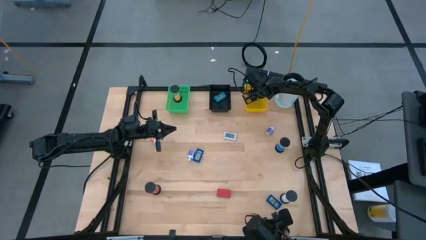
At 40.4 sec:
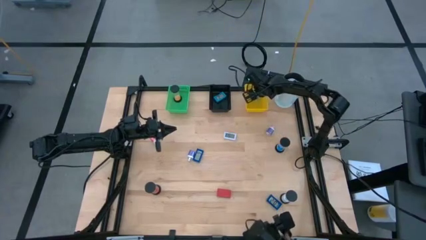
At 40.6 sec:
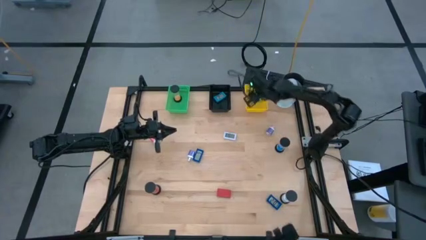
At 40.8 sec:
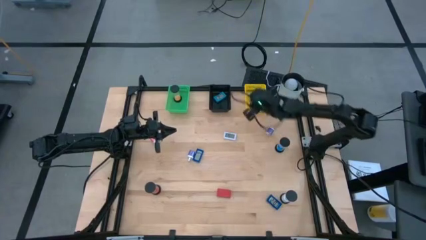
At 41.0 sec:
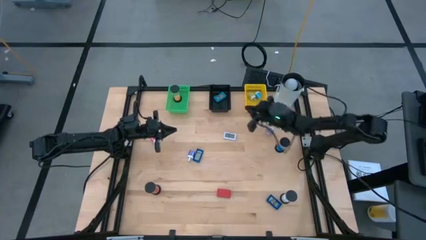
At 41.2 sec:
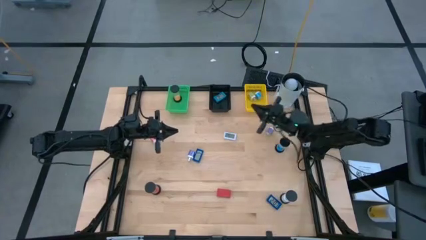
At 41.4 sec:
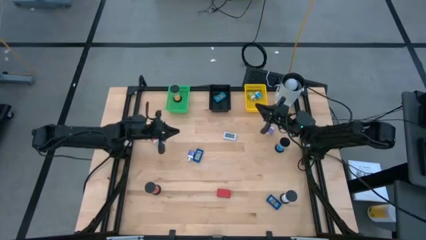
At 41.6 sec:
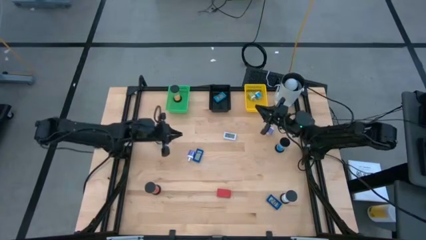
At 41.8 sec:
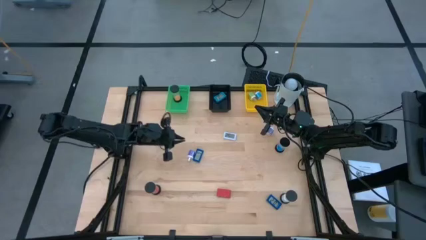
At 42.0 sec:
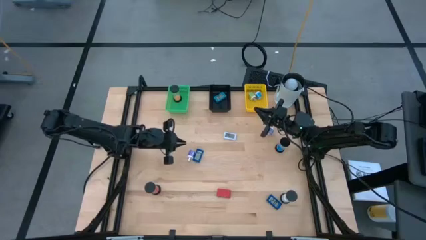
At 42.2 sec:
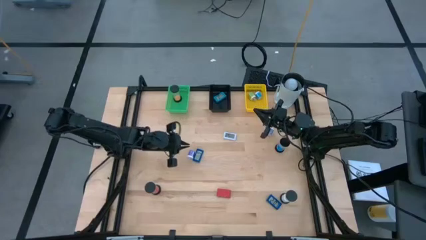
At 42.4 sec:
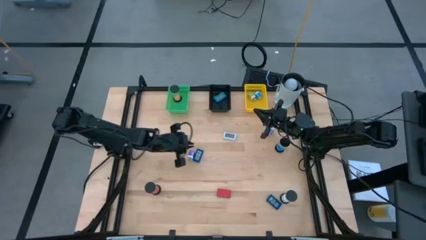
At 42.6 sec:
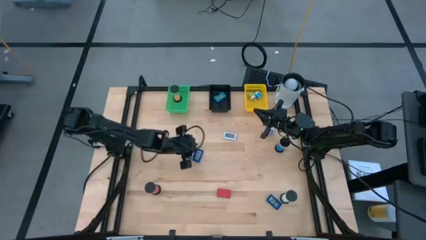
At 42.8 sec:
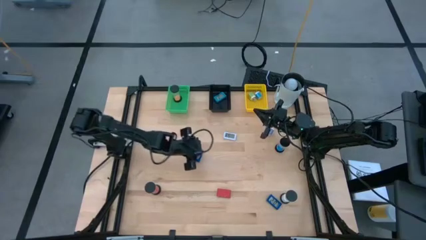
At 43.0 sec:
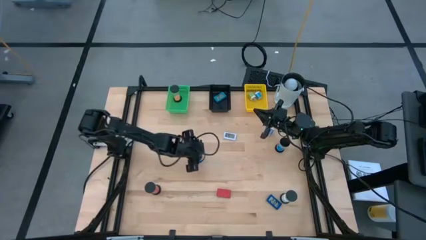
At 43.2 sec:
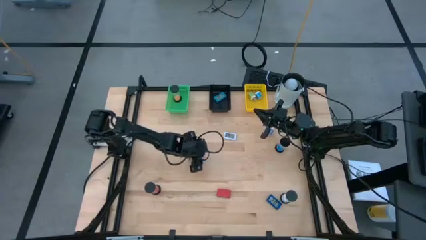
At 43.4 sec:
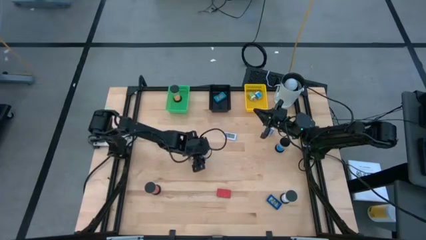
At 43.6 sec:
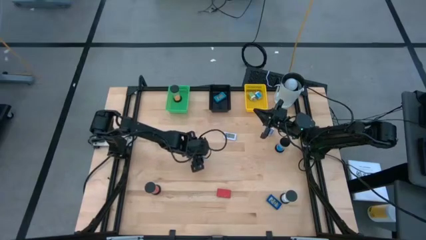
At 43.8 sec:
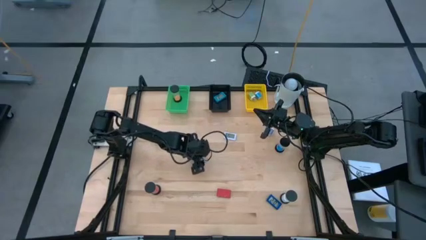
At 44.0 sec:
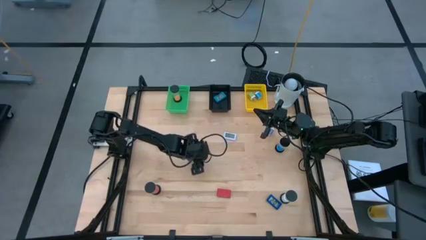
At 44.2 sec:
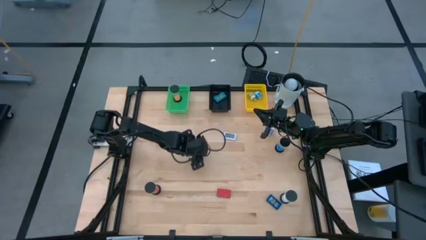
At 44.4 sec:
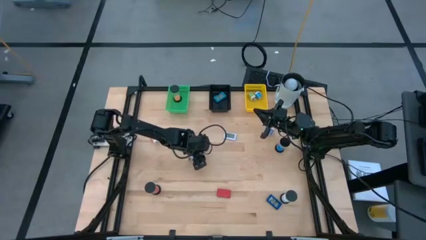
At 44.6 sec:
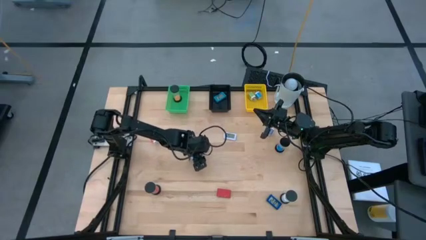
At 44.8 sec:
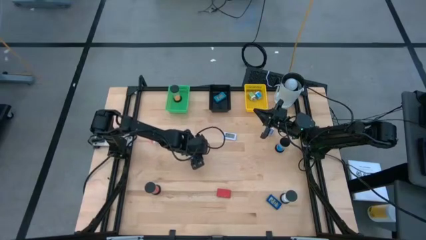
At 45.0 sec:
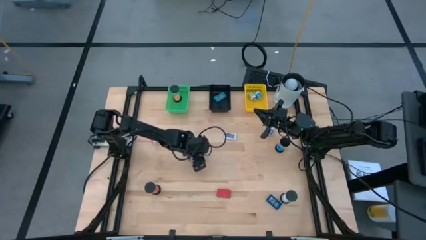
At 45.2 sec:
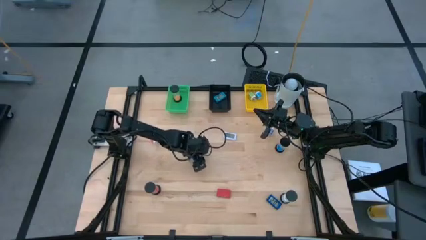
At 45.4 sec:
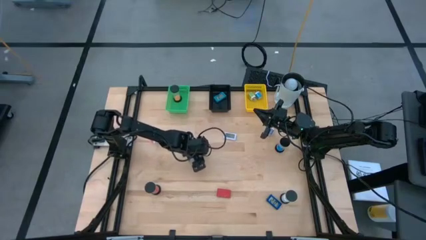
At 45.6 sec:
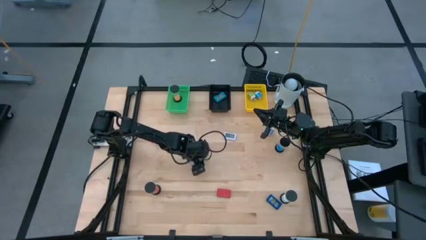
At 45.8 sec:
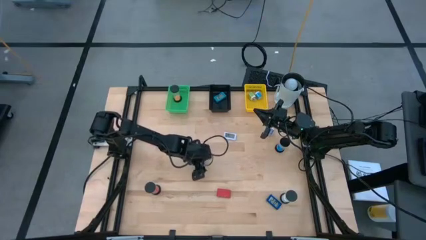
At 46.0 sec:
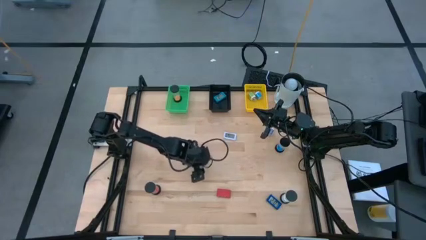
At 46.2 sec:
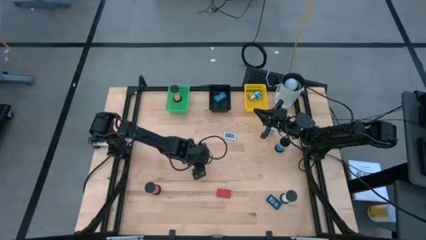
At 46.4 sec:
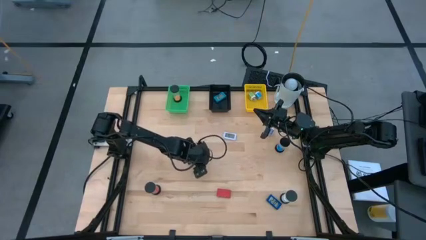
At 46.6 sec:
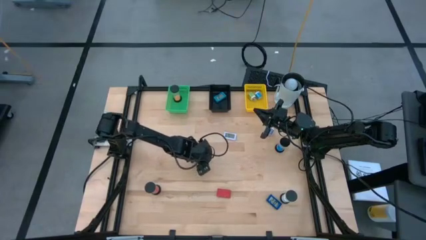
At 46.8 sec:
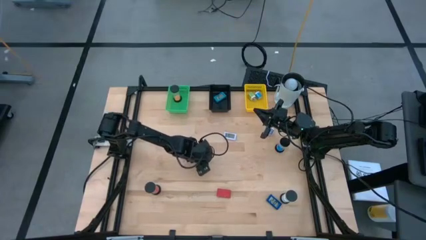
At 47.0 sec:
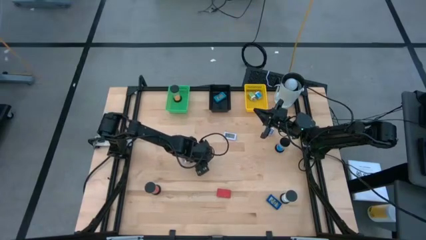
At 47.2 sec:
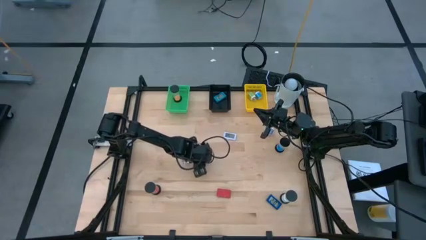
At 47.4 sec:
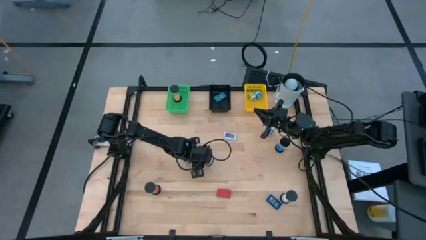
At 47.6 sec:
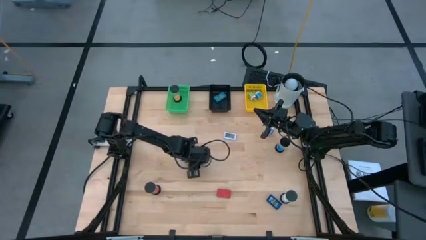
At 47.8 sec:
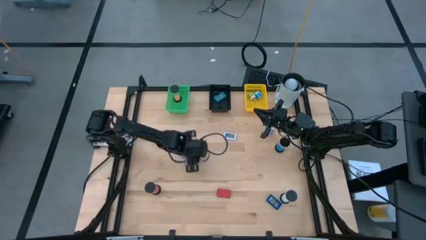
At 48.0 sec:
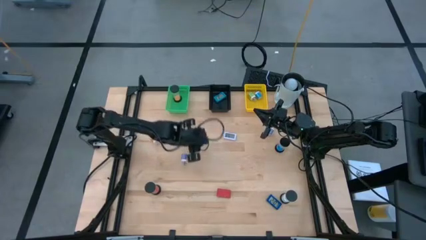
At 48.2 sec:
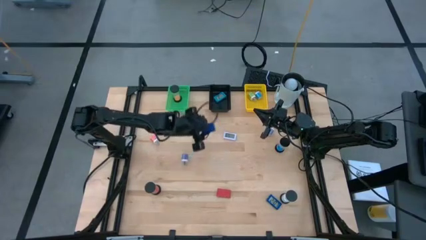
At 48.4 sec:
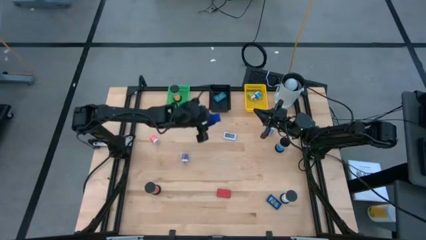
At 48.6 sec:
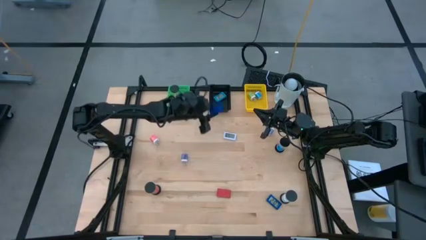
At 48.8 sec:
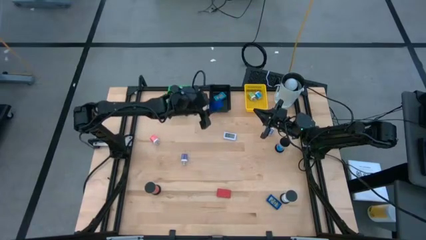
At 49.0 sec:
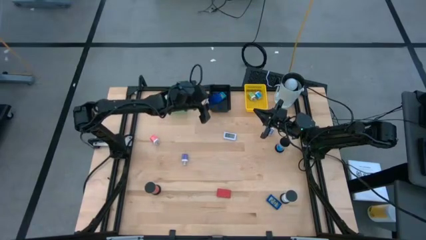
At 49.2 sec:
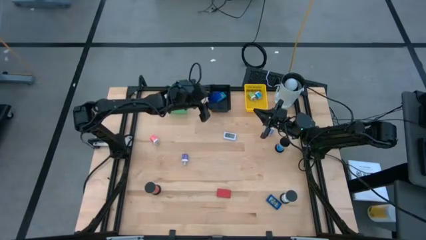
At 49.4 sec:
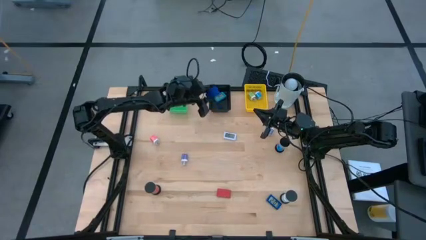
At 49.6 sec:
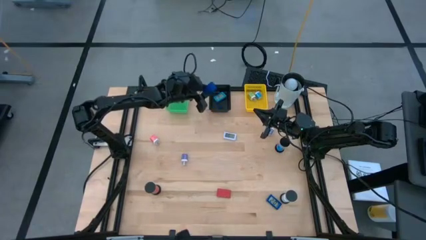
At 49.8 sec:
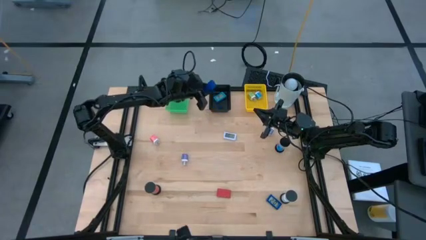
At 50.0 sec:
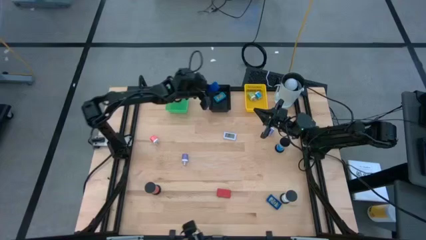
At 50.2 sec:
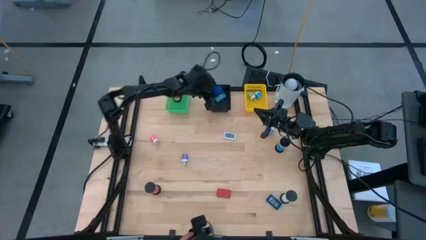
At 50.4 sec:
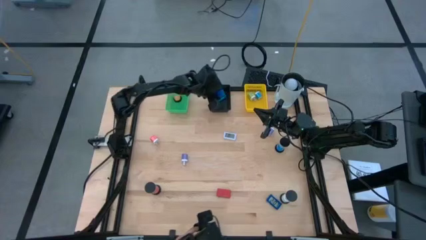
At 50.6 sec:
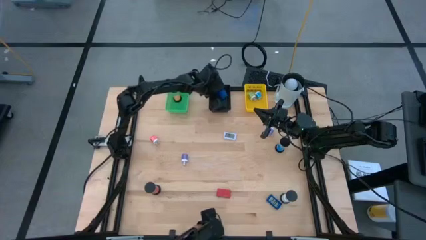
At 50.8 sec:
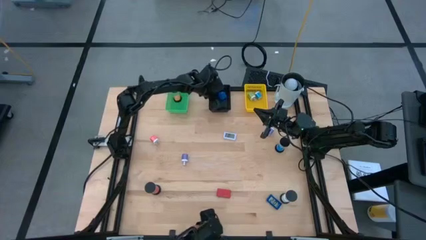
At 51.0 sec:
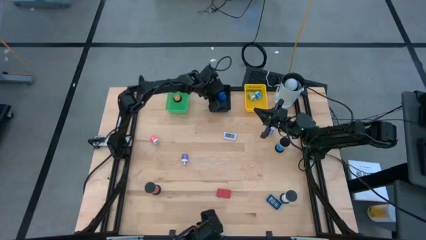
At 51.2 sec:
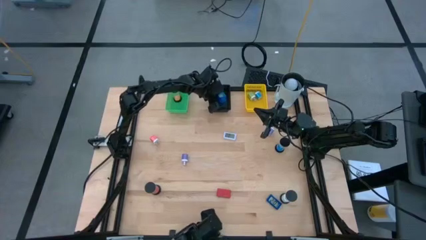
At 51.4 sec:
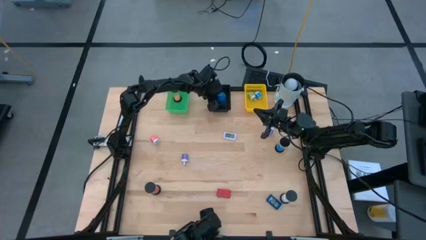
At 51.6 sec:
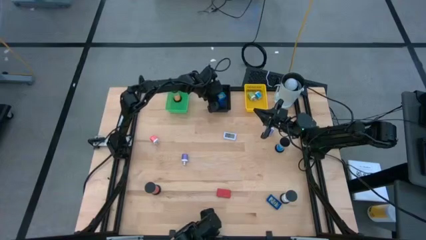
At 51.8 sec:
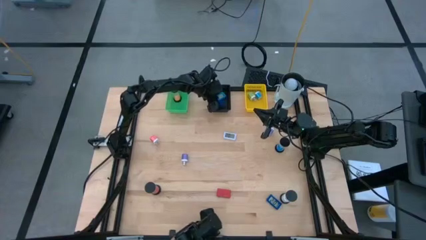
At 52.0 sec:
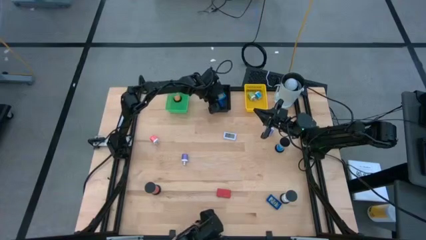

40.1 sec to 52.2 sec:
Task: Pick & Place Office items
Put the top dark blue digital timer into the black bin

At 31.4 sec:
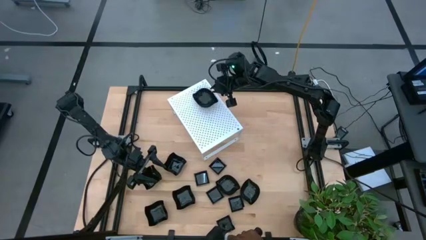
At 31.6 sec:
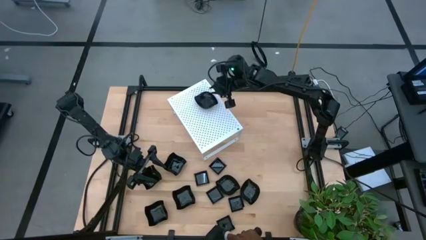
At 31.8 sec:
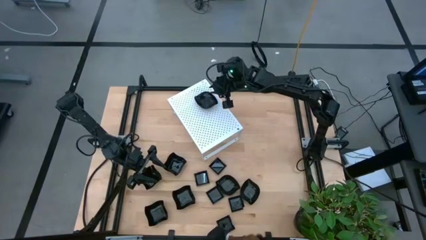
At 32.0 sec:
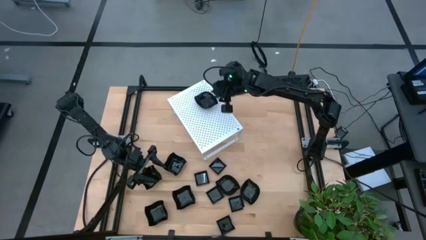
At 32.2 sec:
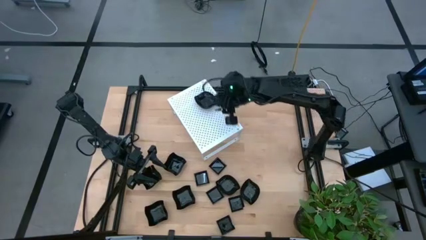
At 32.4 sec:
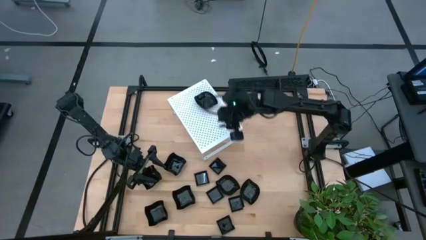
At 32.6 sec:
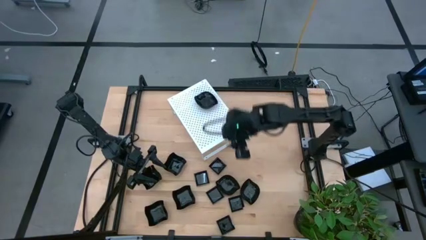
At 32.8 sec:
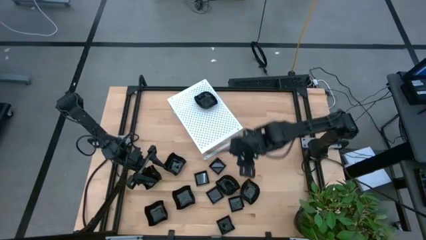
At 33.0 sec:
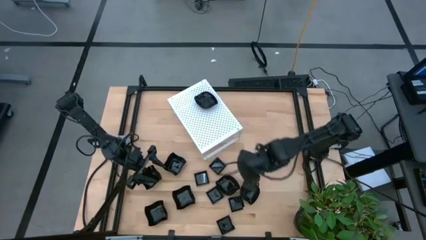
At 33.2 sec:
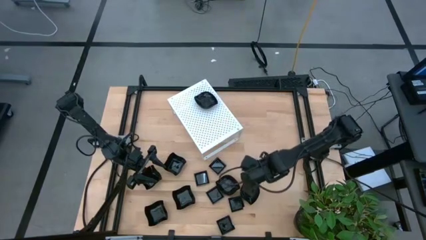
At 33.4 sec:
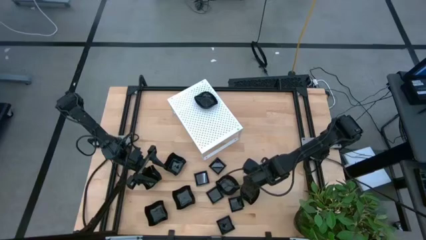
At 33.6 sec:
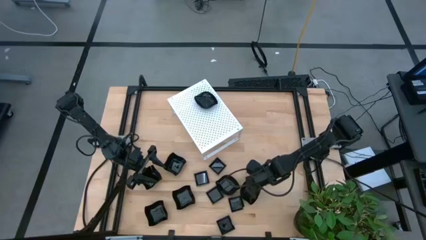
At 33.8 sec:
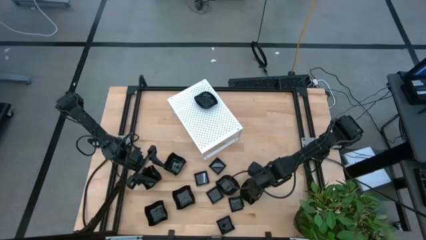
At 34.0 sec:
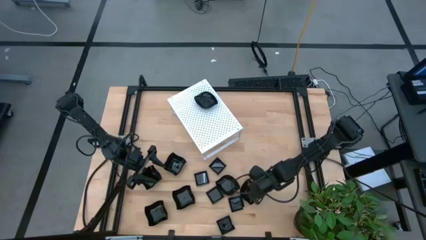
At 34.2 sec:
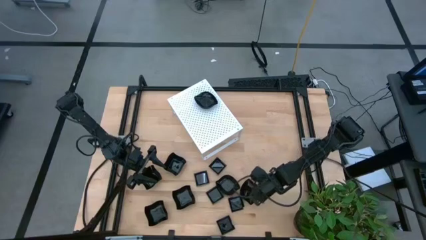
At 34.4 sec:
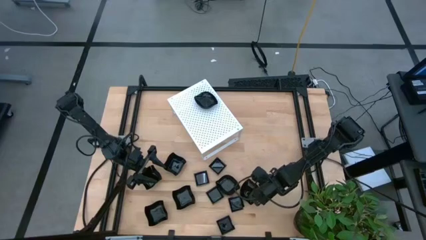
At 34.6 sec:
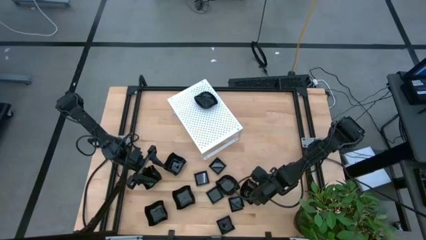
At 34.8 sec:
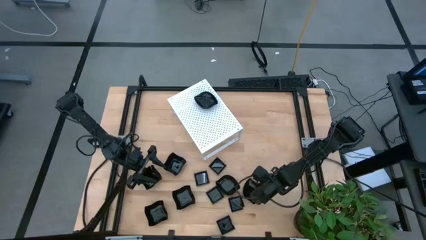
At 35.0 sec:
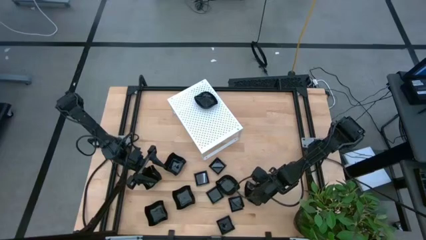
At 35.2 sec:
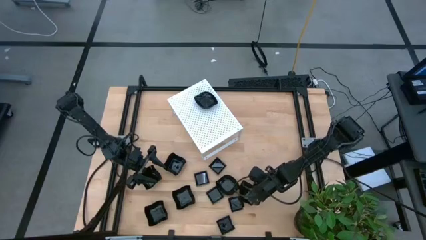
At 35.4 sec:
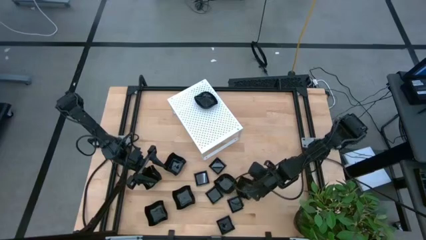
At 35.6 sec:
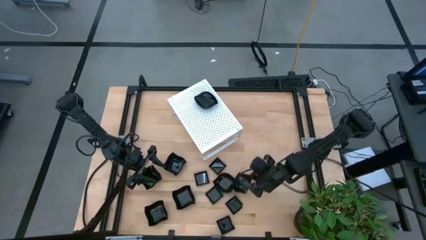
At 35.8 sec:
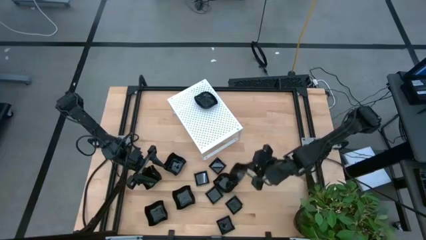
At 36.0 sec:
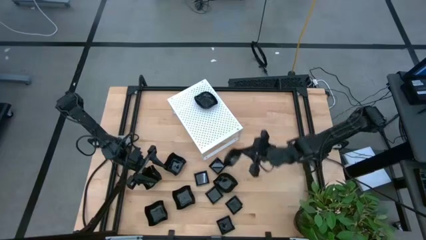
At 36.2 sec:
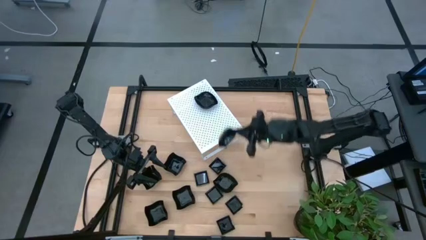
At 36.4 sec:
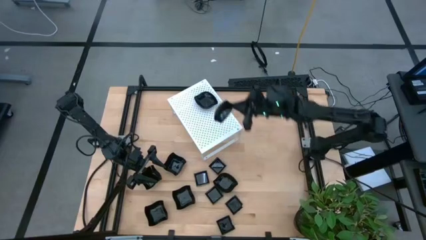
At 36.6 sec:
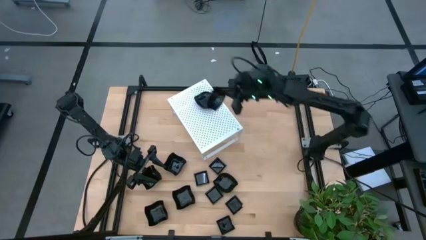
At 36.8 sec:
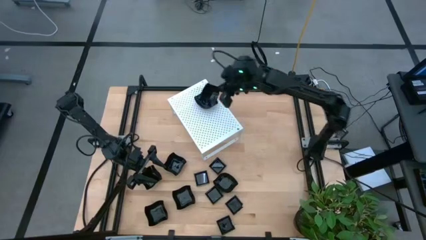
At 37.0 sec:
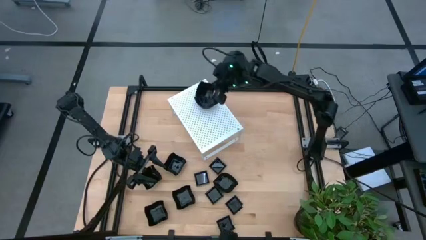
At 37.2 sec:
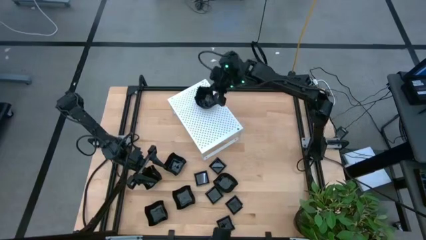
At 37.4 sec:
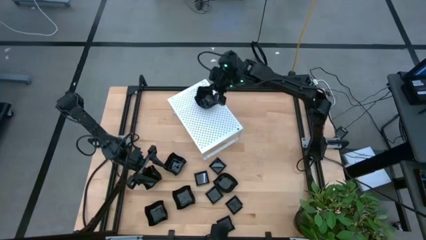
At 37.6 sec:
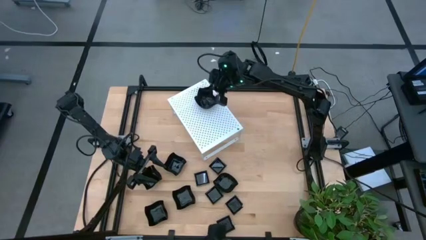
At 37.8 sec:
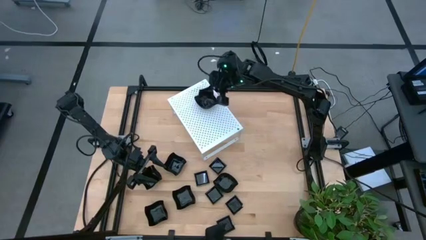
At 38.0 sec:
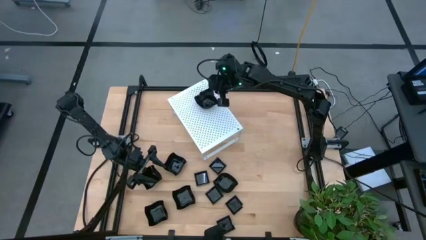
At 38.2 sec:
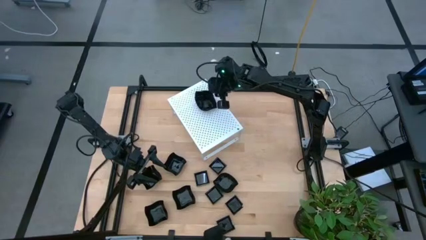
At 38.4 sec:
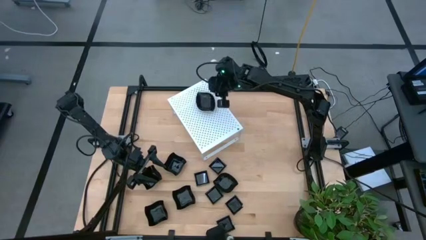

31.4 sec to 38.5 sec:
Task: Pick & Place Mini shaped plates
Stack the leaf-shaped plate on top of the stacked leaf-shaped plates on the shelf
